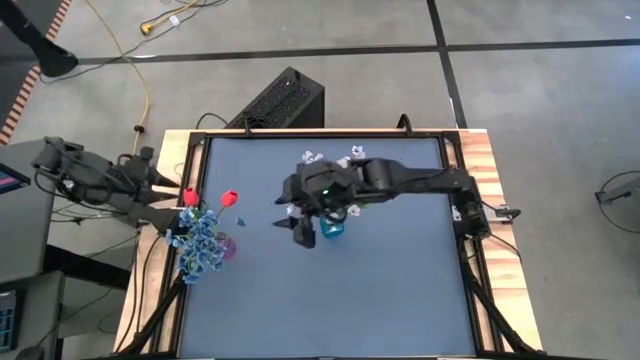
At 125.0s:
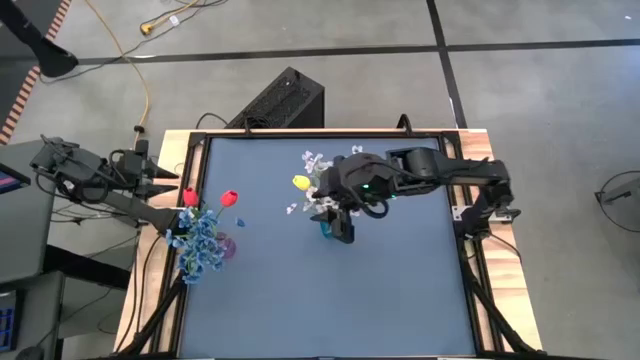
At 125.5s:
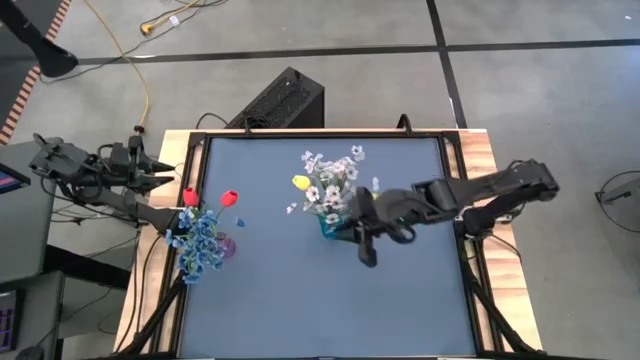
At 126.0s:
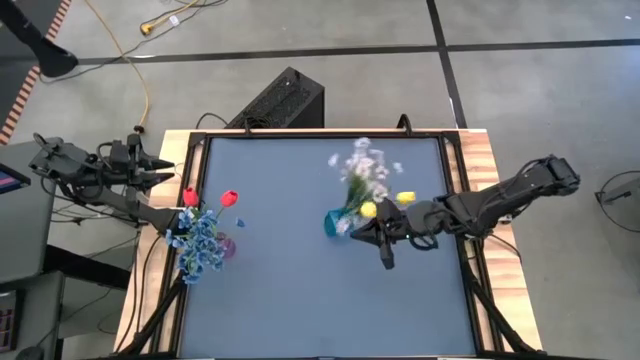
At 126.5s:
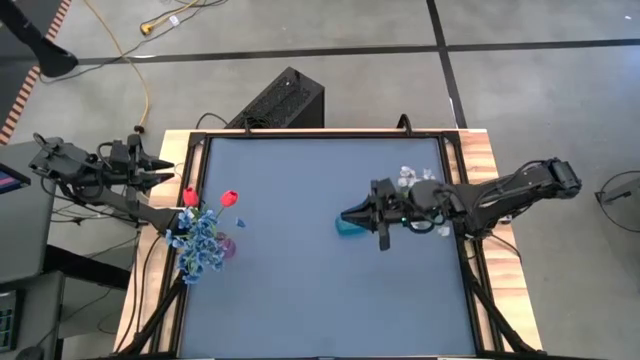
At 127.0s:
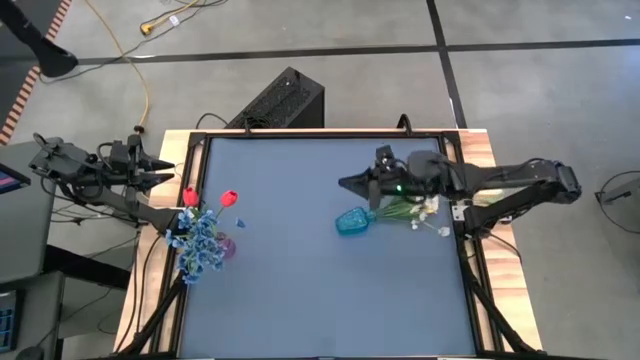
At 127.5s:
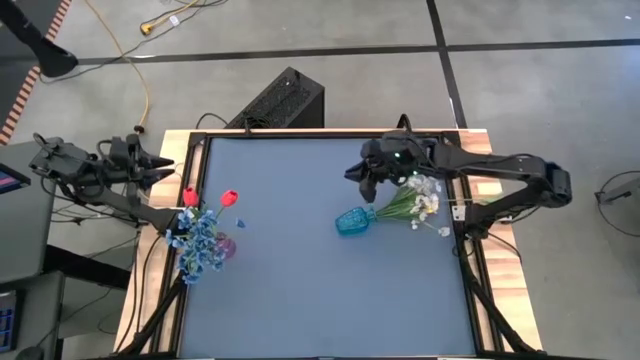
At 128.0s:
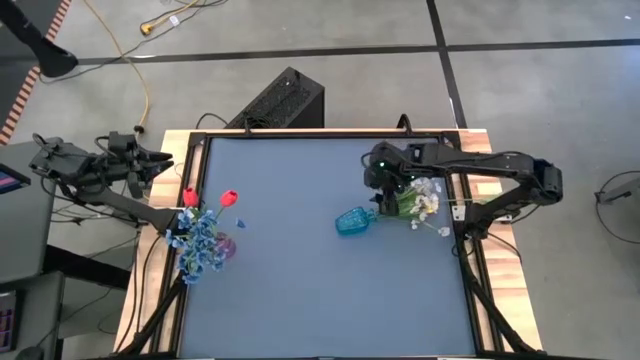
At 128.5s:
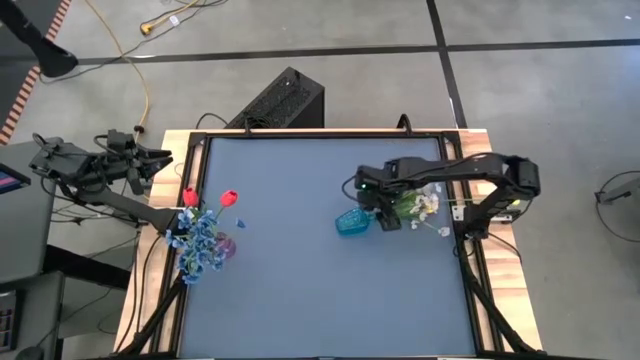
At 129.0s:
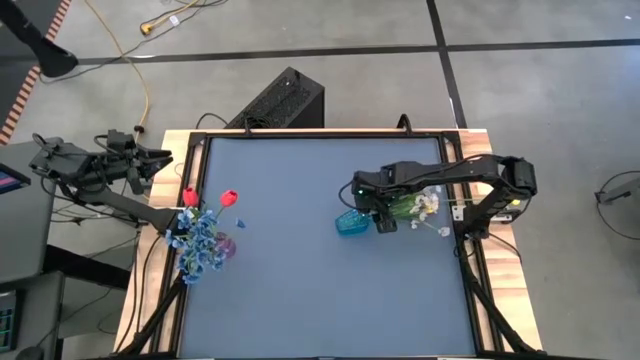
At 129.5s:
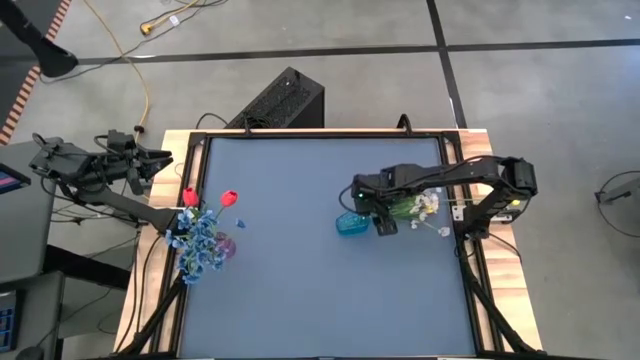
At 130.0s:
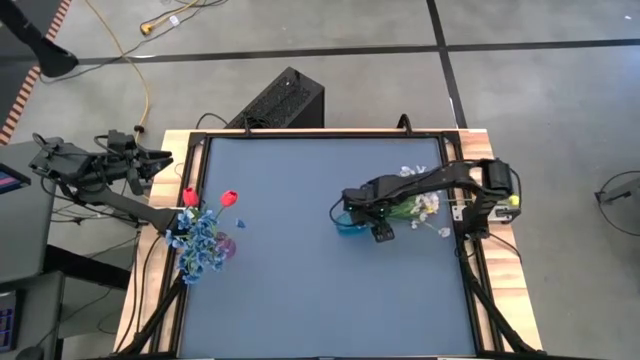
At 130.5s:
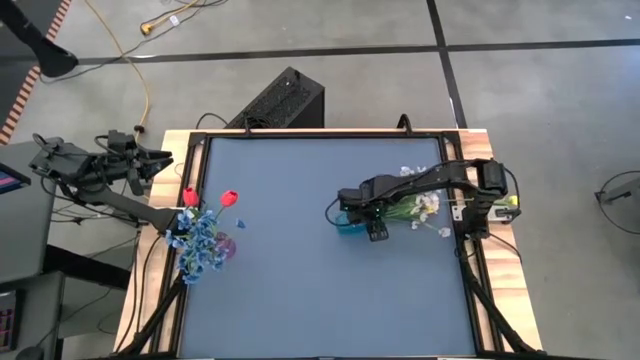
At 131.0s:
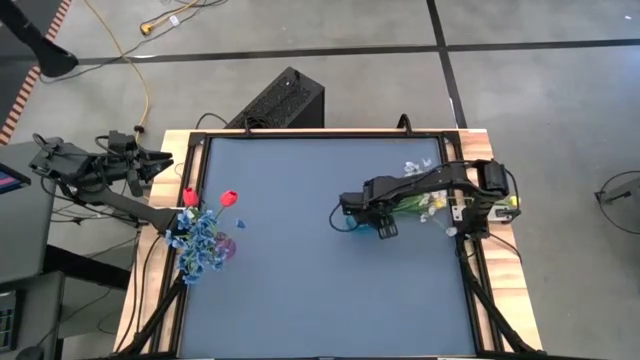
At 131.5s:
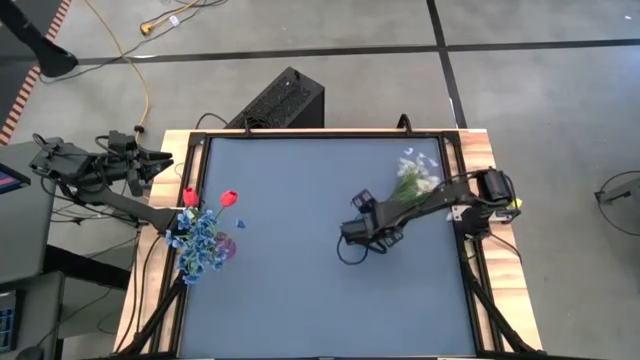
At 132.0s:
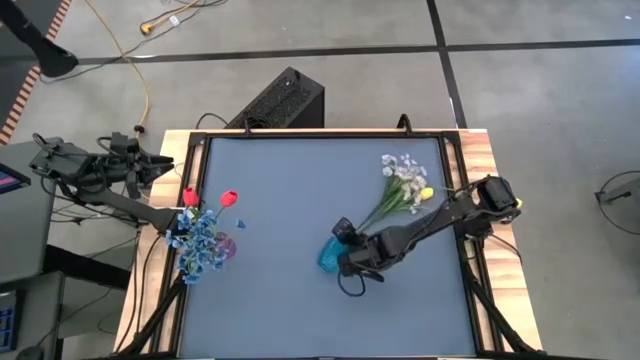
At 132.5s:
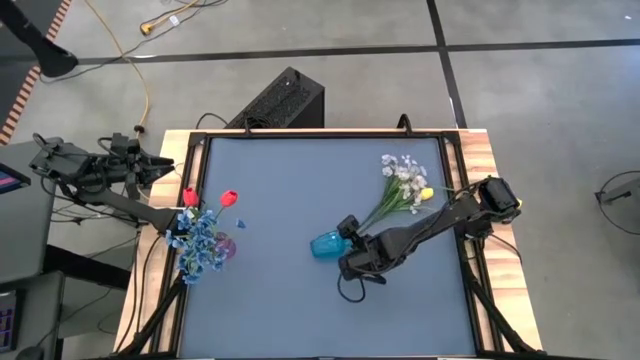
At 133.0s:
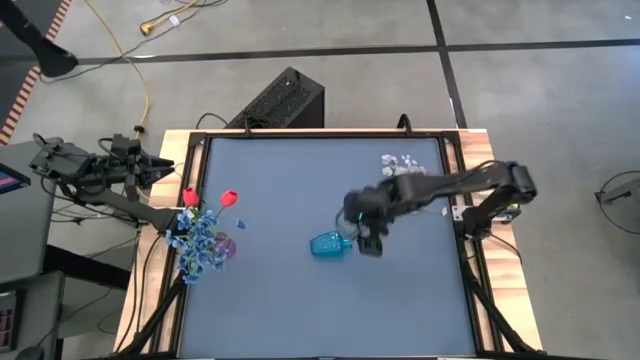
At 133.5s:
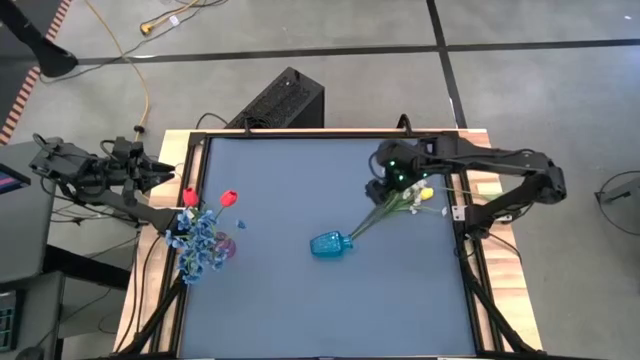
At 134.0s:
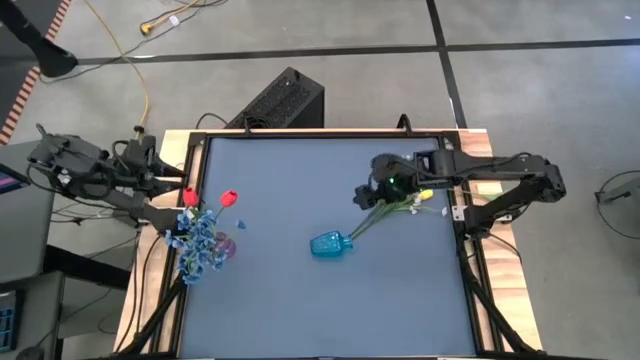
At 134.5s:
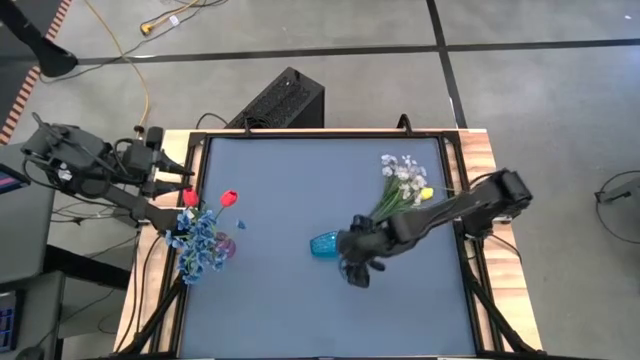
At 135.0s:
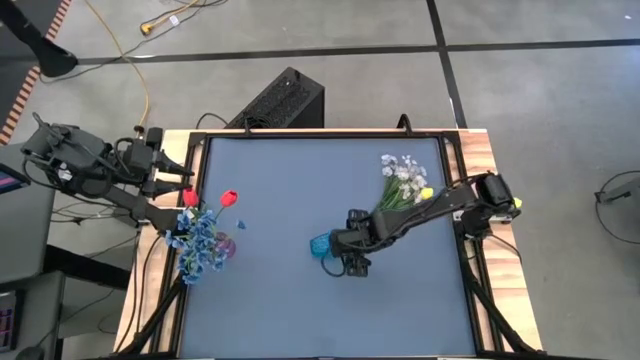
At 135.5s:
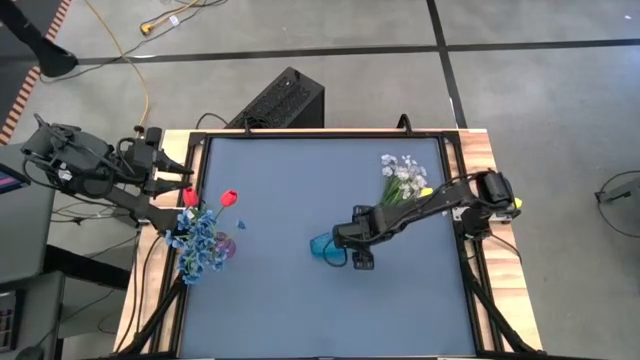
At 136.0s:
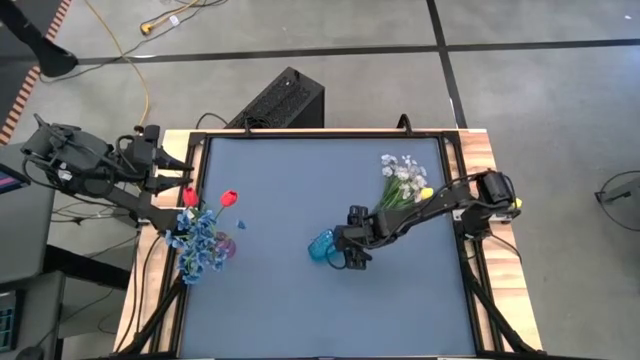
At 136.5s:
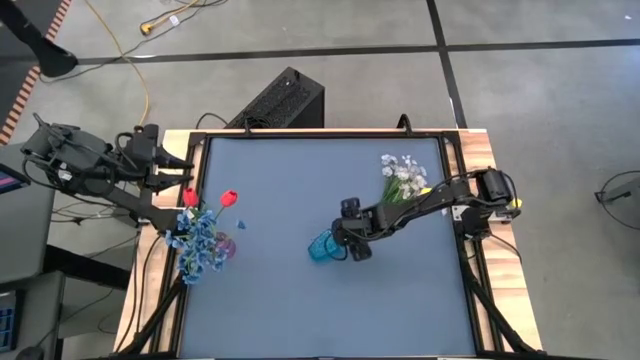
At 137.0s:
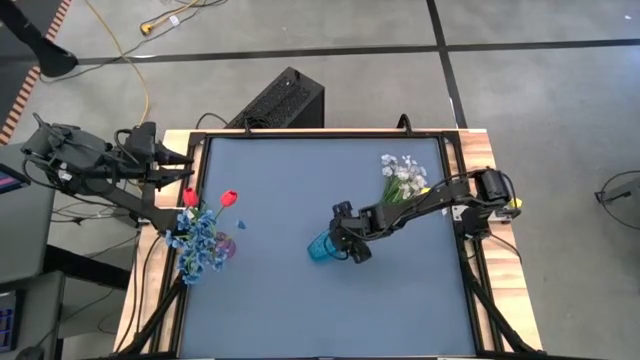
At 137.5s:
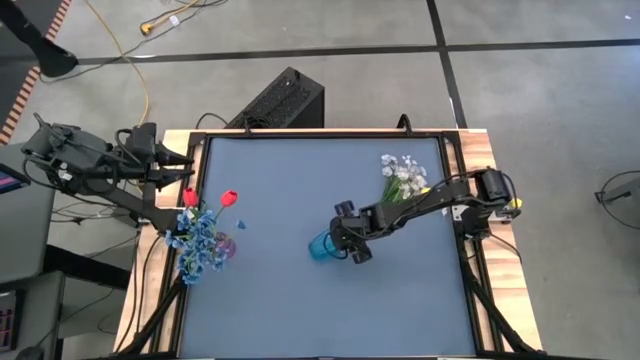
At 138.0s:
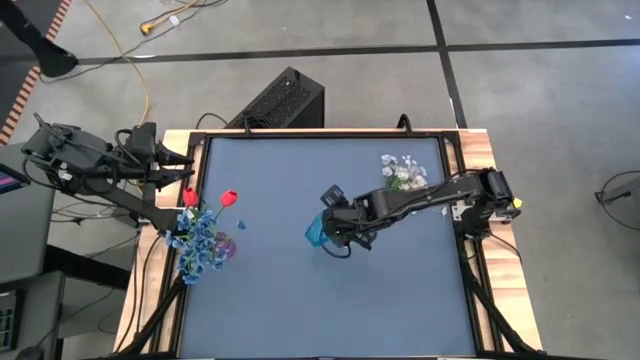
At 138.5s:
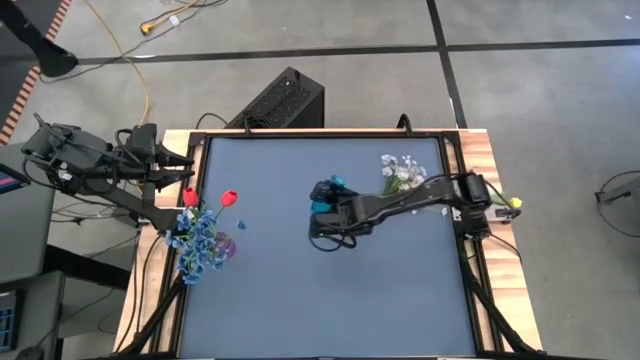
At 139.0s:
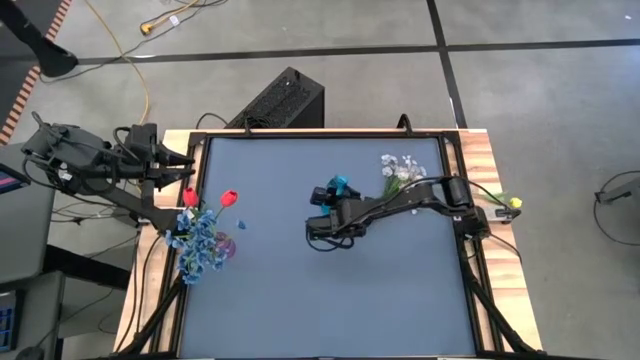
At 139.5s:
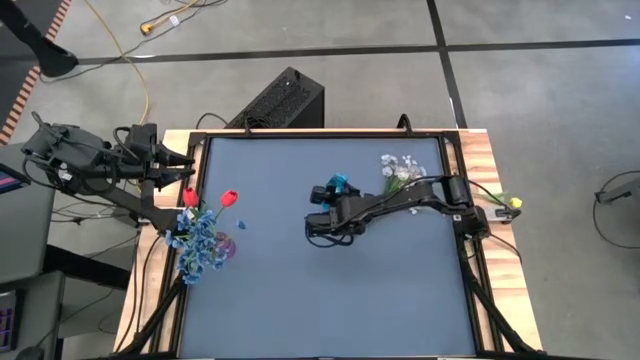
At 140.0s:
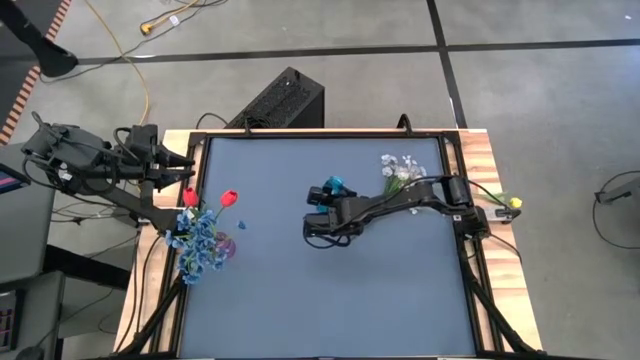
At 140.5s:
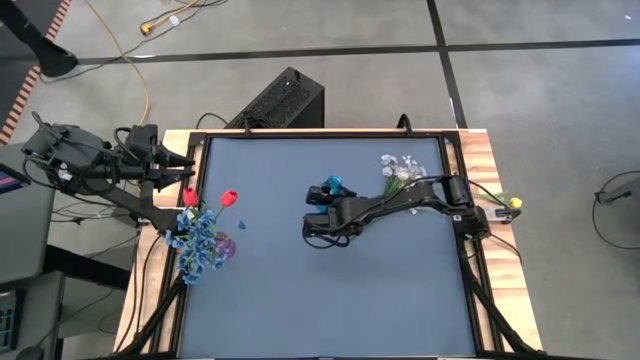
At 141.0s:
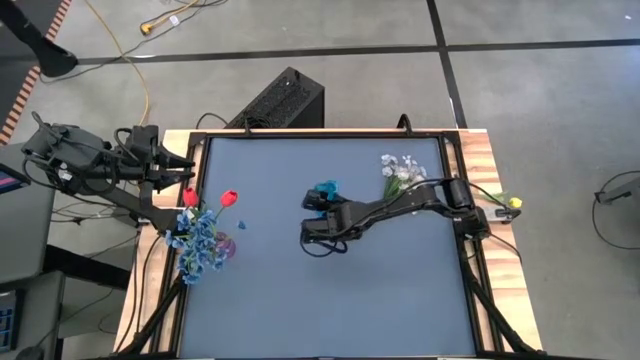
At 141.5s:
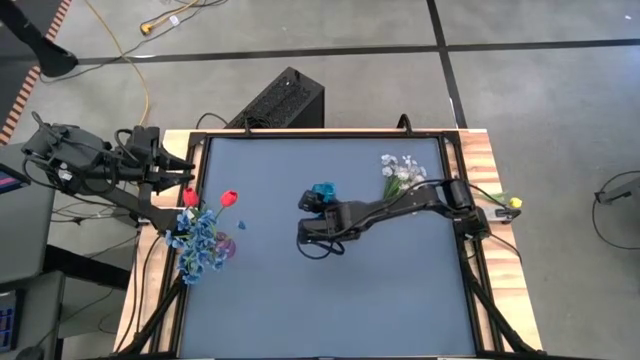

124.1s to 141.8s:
Task: Sort flowers into vase by color
Adjust the blue vase

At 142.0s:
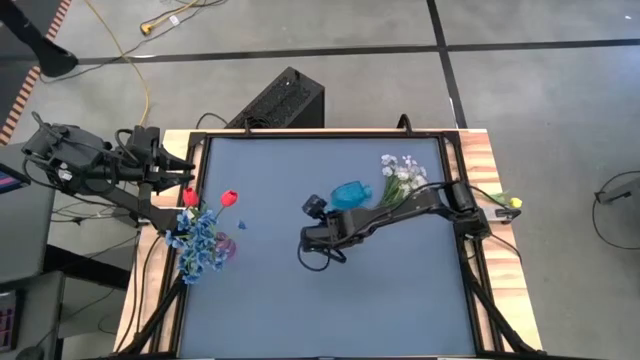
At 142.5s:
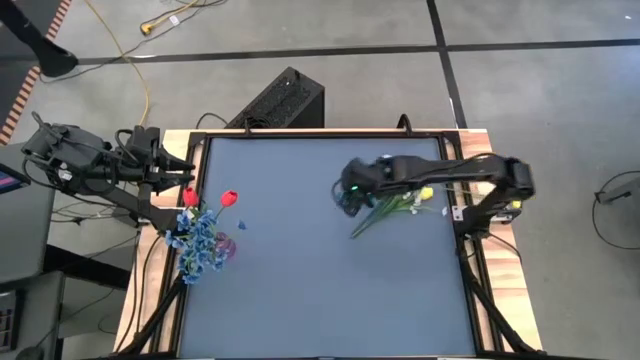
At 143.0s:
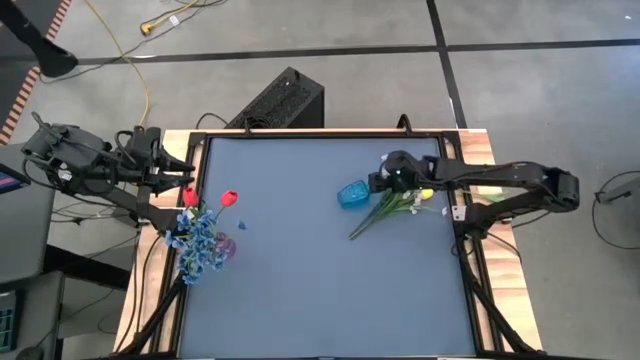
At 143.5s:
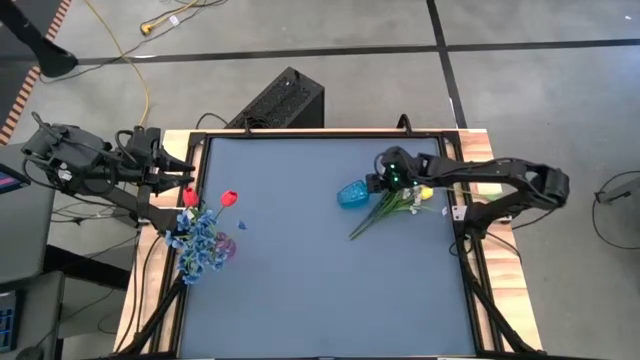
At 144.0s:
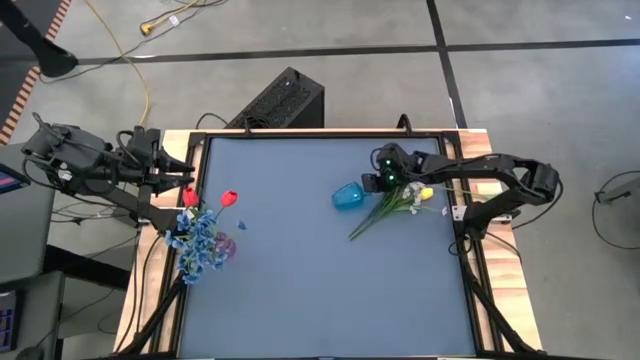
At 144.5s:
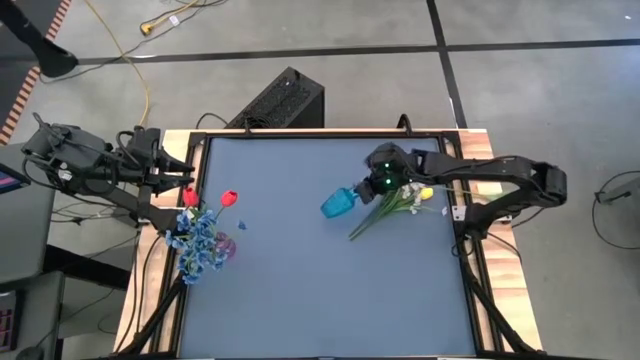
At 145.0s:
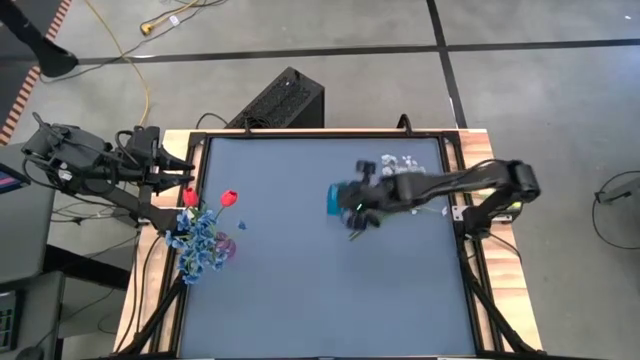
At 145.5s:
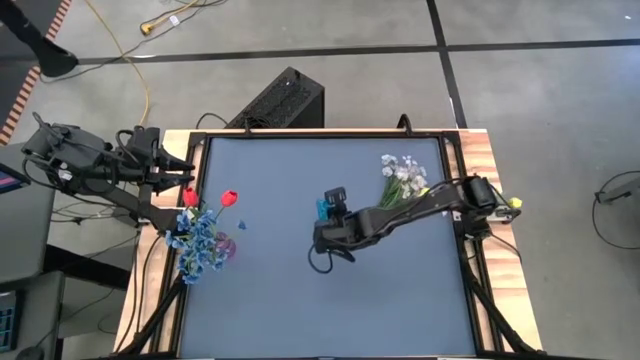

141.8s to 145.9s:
Adjust the blue vase
